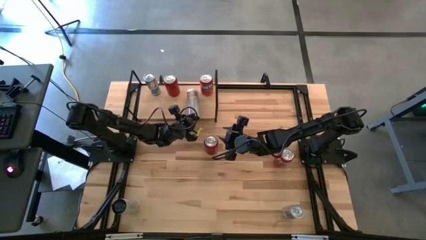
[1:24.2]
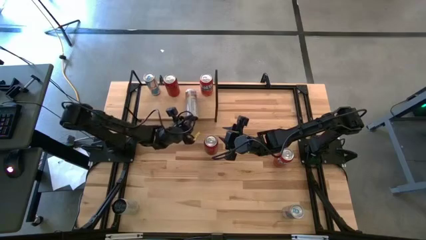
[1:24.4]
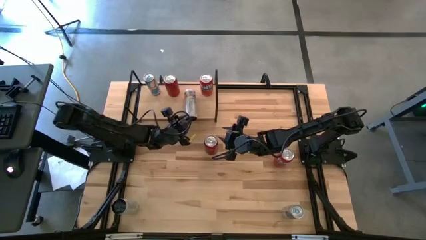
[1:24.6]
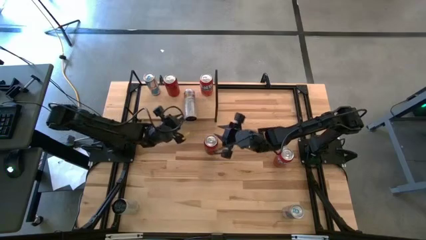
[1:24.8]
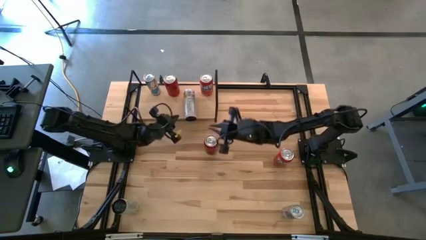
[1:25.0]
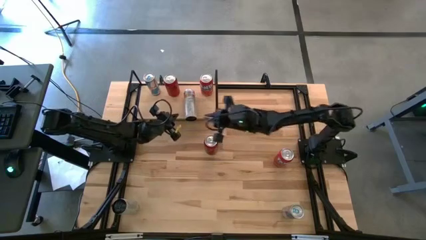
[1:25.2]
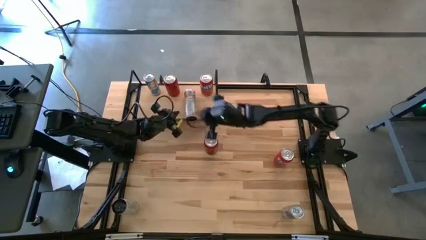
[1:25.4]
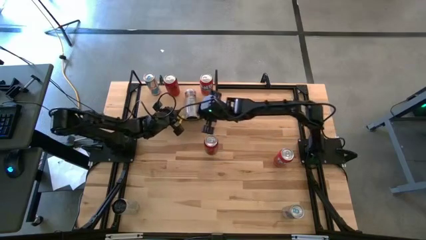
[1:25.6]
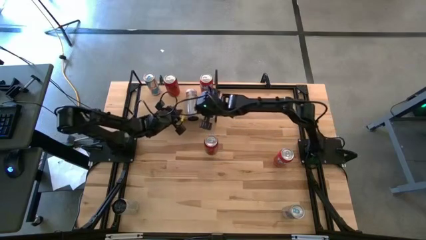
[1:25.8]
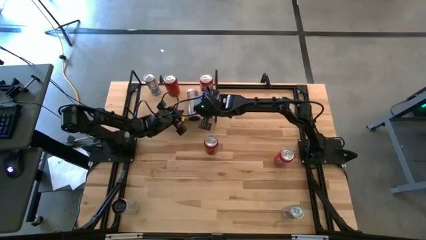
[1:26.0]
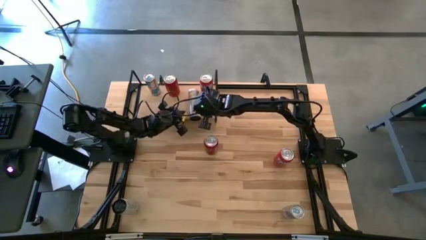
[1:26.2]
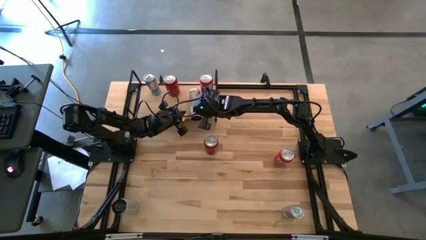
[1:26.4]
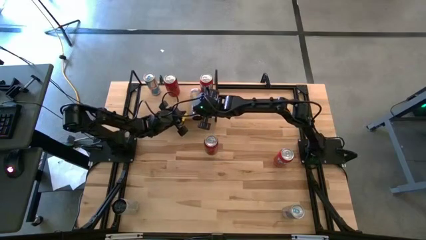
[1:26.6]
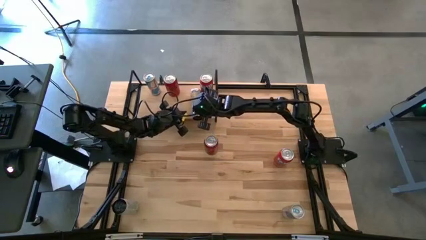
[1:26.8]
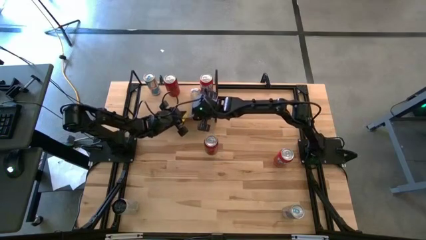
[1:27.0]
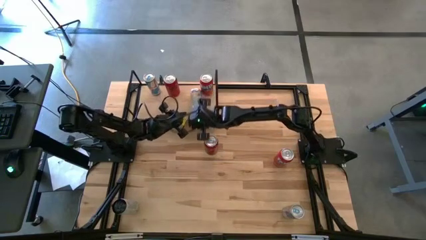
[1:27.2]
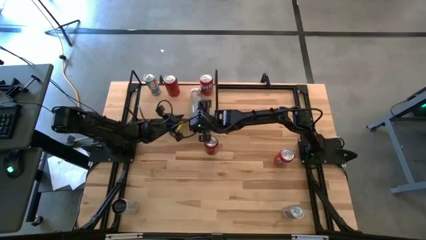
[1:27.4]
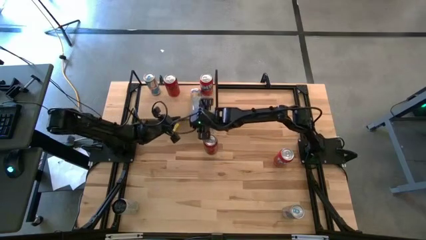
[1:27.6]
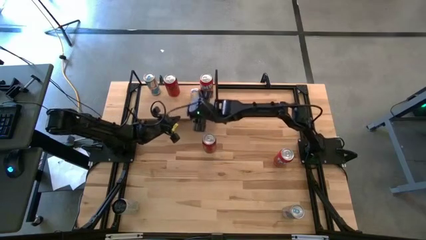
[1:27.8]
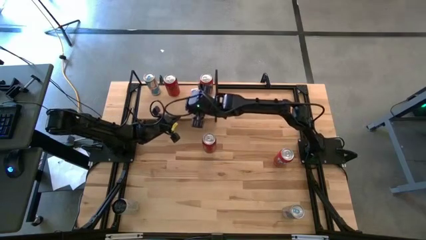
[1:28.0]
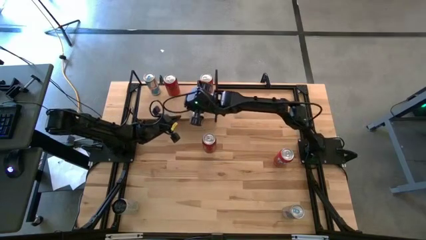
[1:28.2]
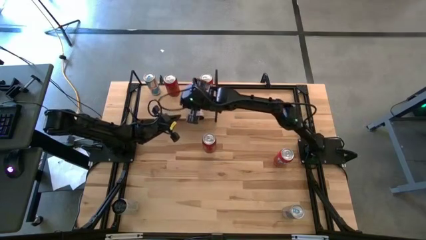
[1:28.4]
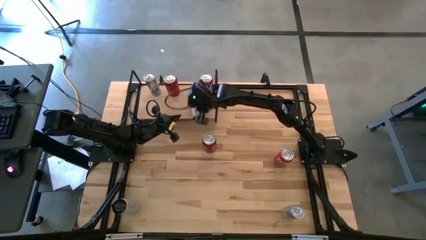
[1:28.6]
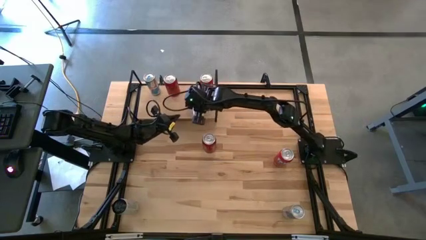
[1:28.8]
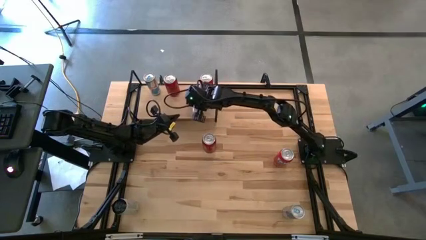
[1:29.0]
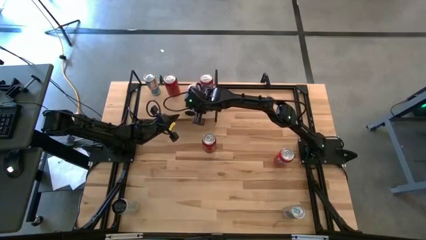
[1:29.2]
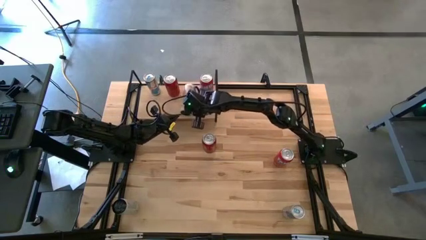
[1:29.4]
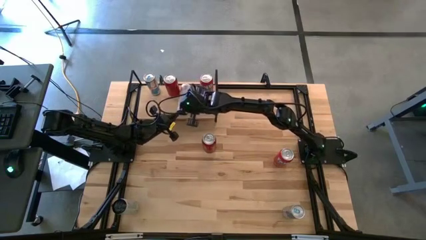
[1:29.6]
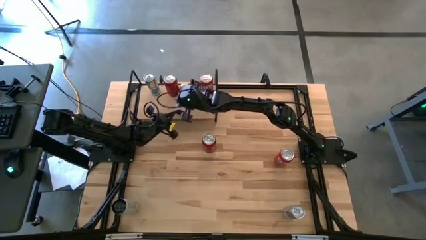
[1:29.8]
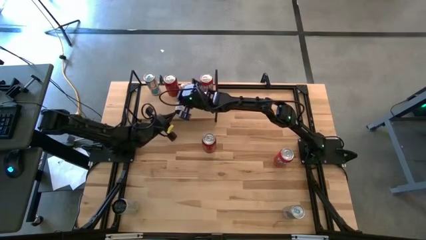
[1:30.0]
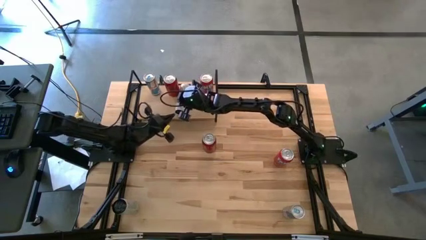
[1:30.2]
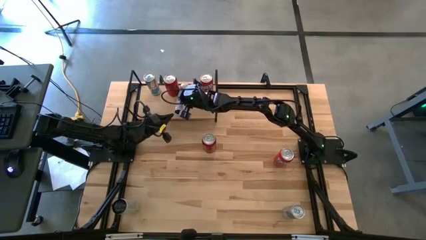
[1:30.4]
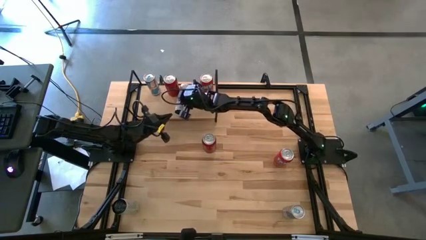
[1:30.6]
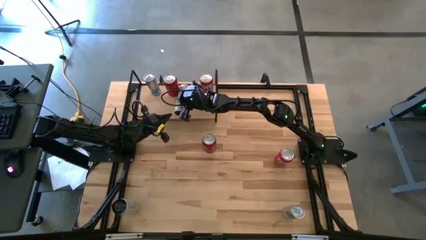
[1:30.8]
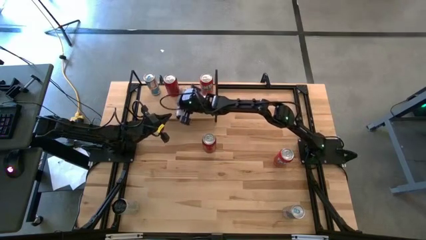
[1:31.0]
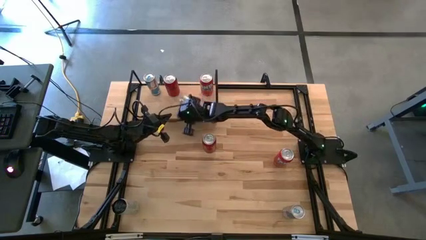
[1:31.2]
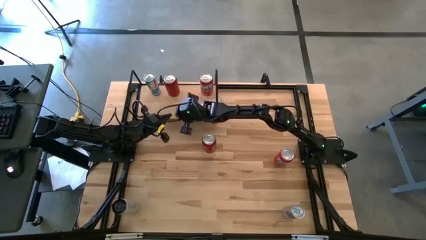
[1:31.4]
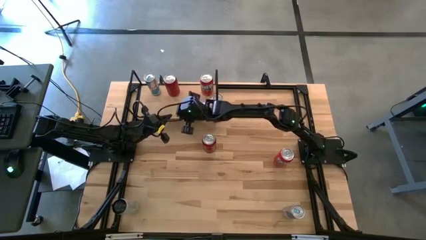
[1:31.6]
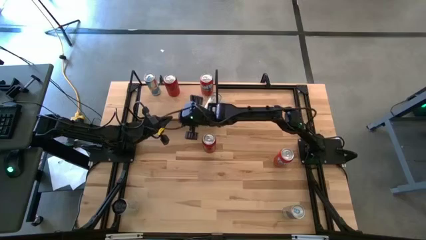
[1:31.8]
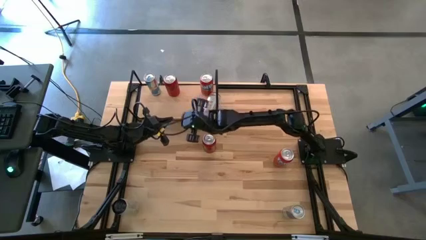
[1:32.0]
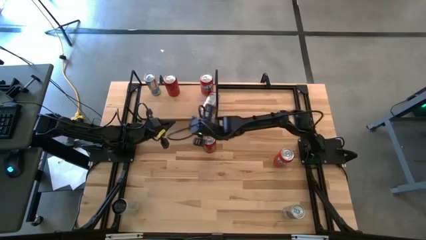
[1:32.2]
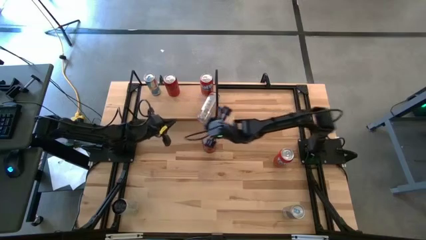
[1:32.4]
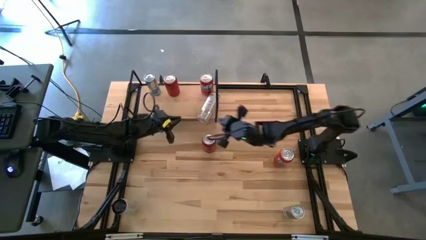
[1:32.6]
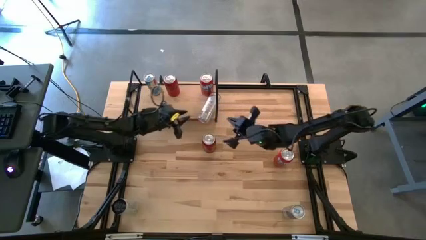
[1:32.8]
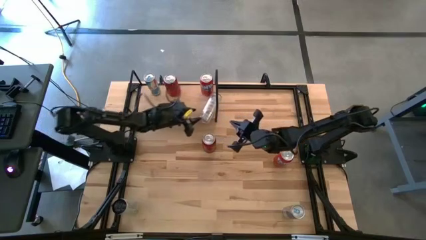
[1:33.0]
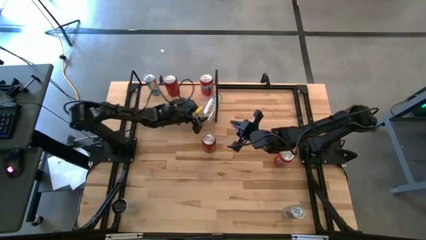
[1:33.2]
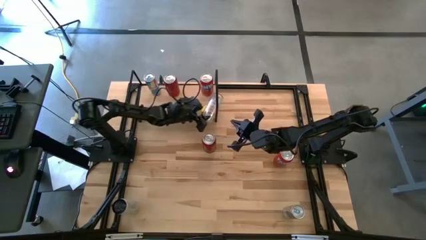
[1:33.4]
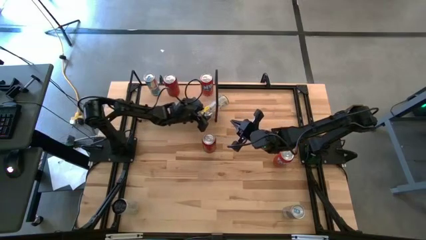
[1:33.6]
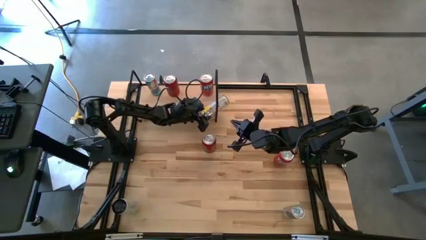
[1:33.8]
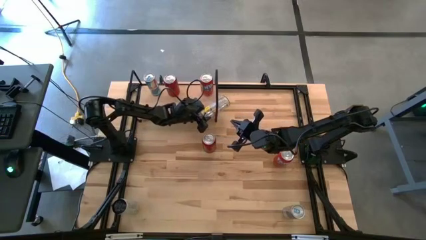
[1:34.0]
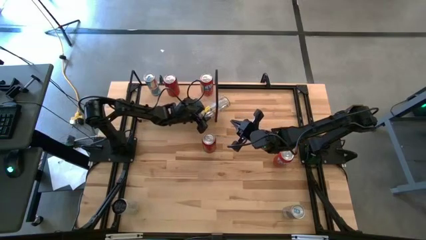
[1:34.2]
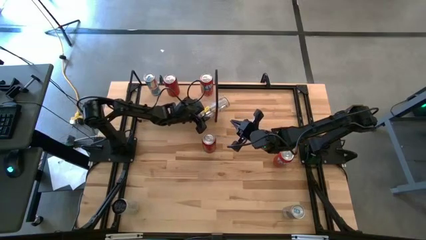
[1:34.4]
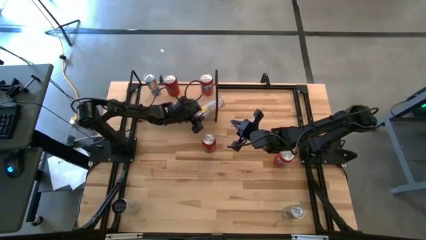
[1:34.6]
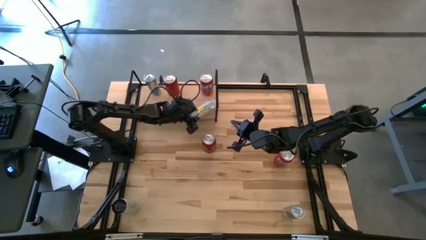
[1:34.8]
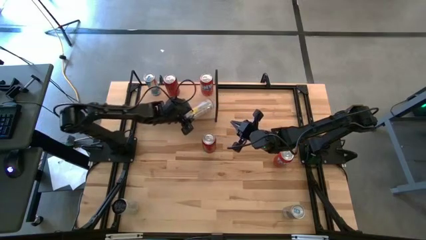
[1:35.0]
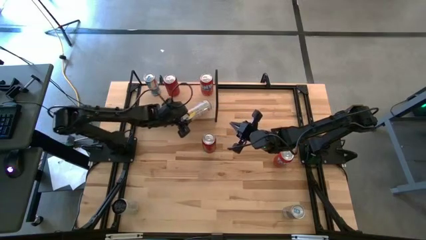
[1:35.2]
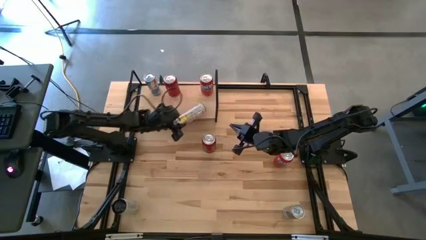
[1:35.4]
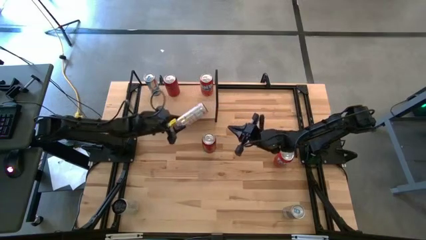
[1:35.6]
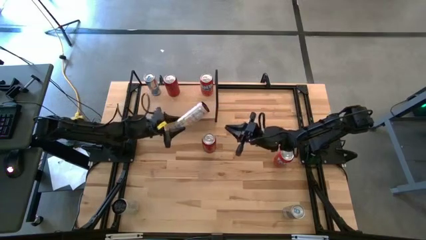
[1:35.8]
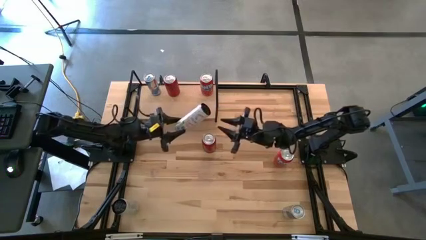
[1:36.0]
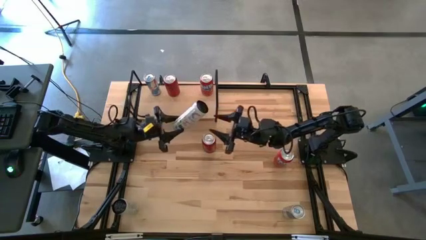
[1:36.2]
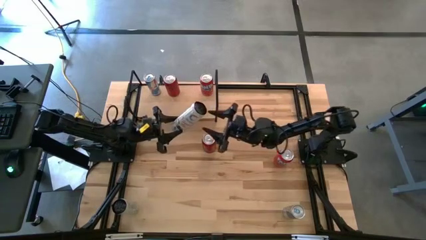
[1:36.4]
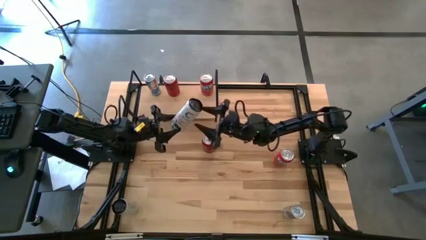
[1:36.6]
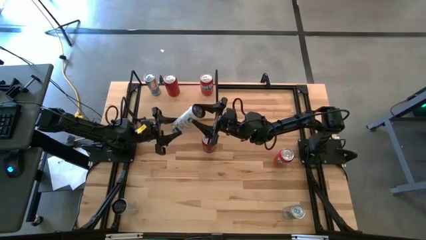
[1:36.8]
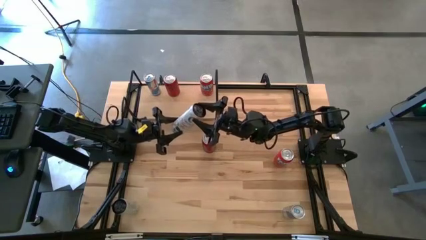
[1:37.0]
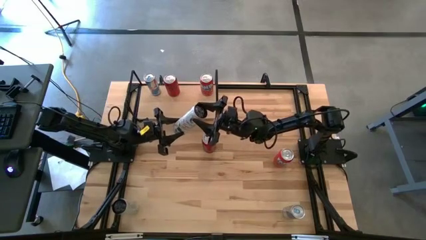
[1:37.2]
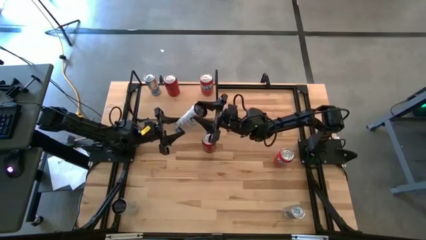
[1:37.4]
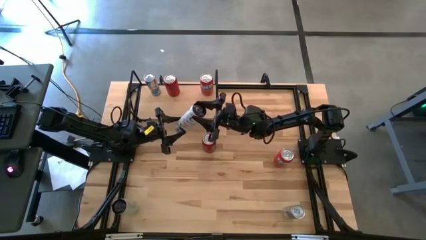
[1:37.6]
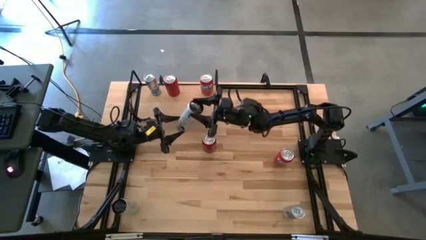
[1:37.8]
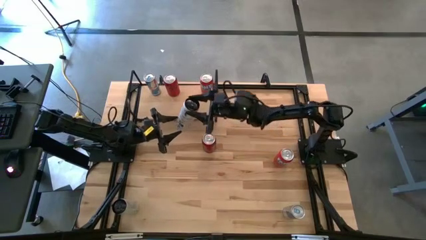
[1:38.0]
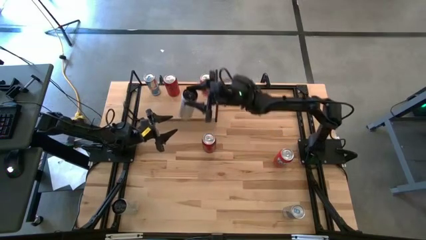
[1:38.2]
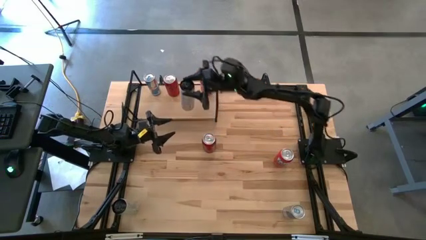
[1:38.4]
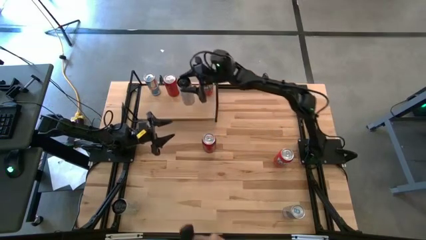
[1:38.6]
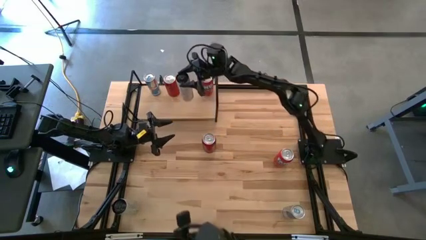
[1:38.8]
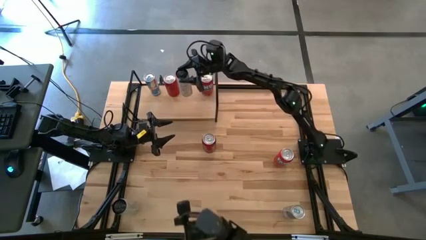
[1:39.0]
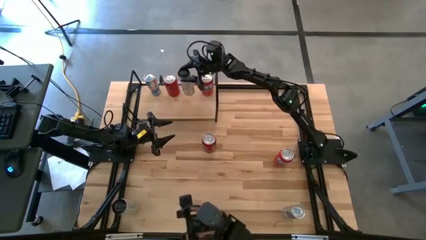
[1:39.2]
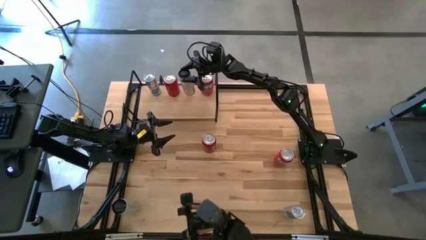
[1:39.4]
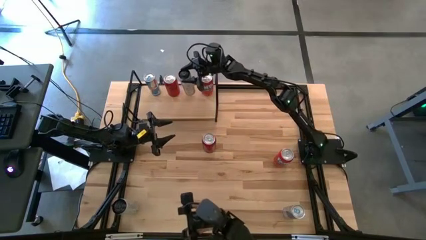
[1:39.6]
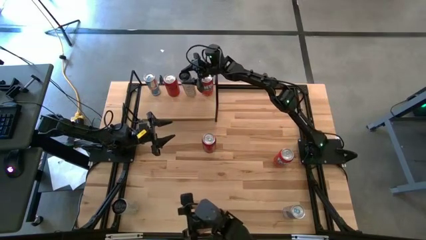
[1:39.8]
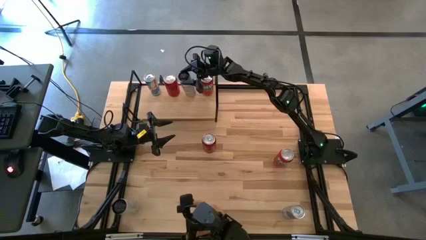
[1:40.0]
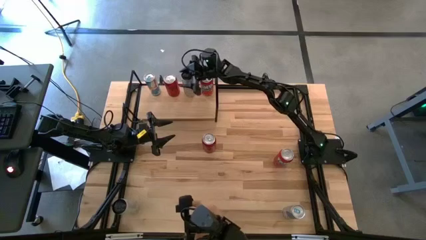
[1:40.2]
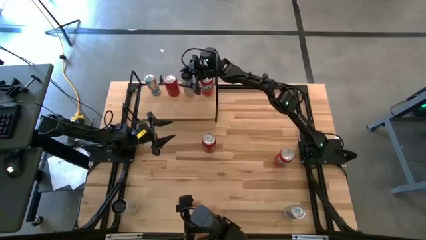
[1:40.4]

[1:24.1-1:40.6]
Task: Place canned beverage on shelf
Adjust the white soda can on the shelf
